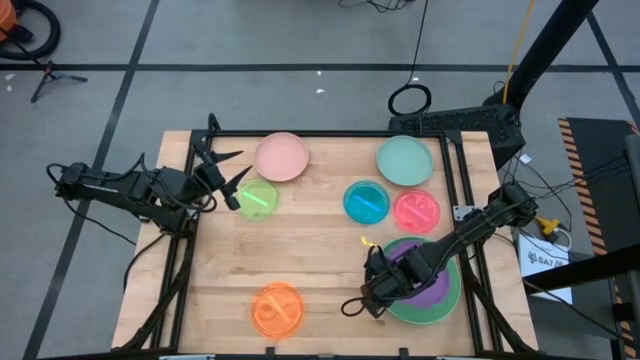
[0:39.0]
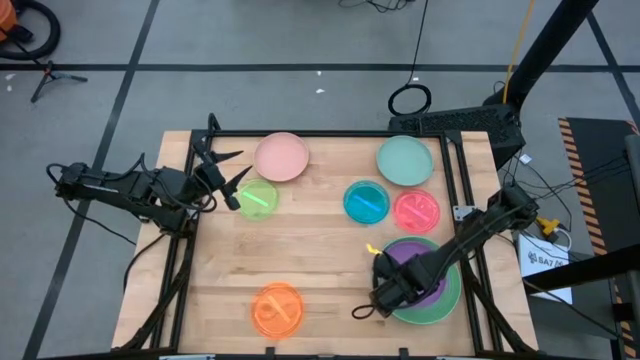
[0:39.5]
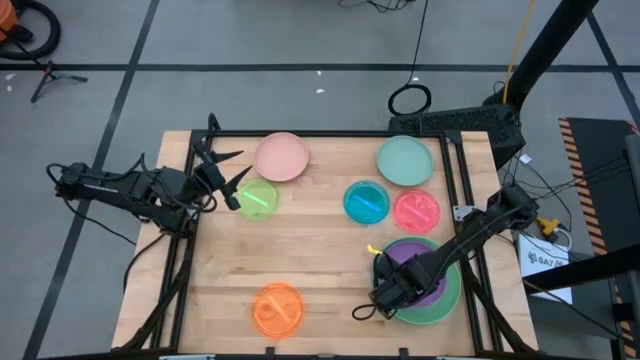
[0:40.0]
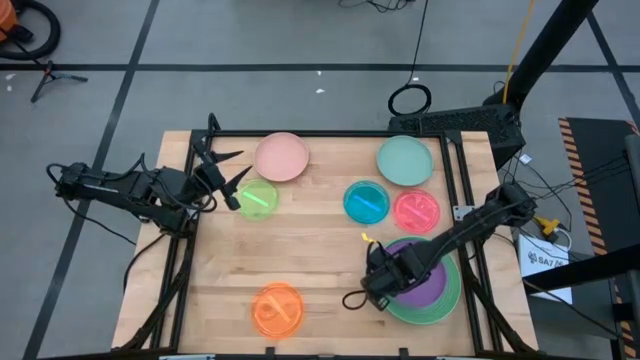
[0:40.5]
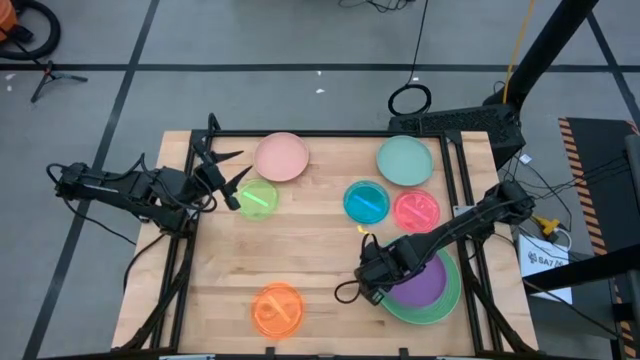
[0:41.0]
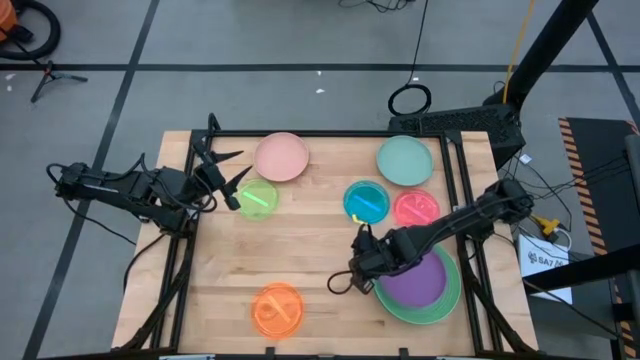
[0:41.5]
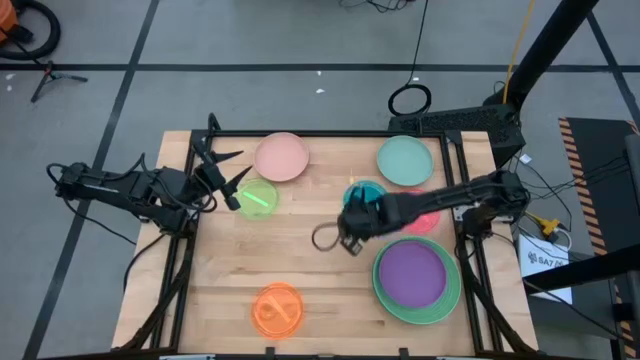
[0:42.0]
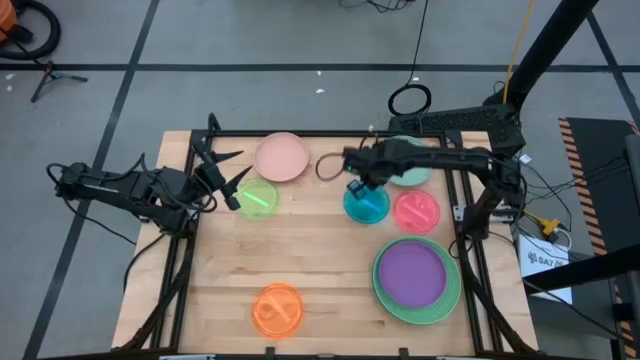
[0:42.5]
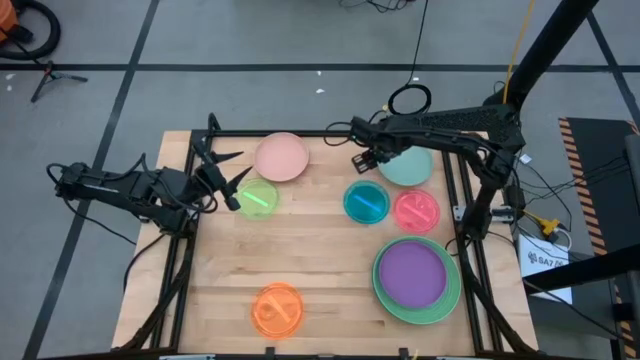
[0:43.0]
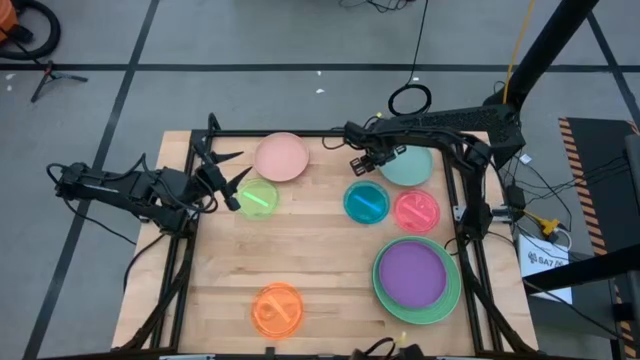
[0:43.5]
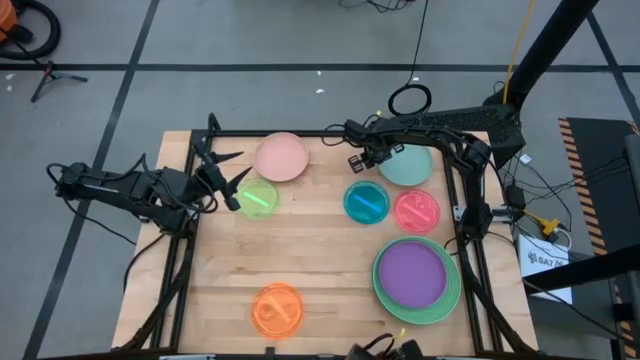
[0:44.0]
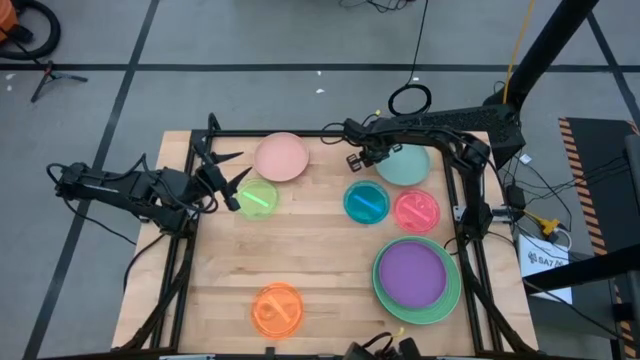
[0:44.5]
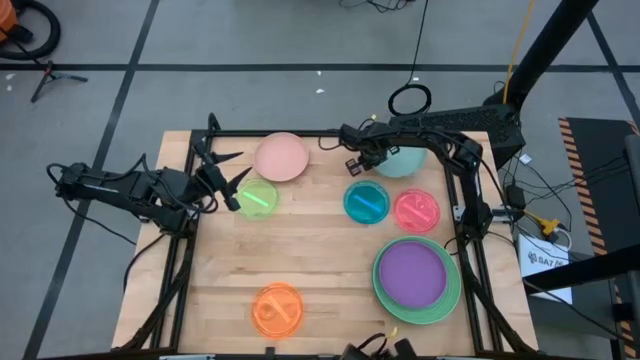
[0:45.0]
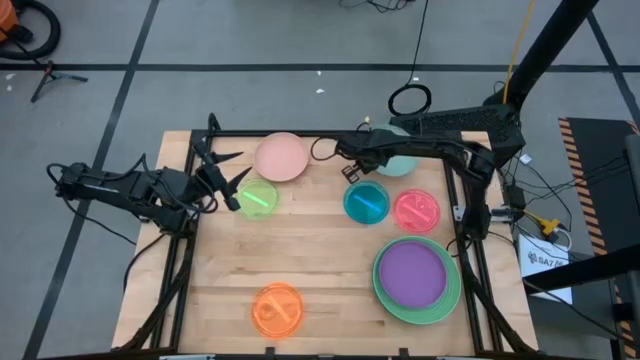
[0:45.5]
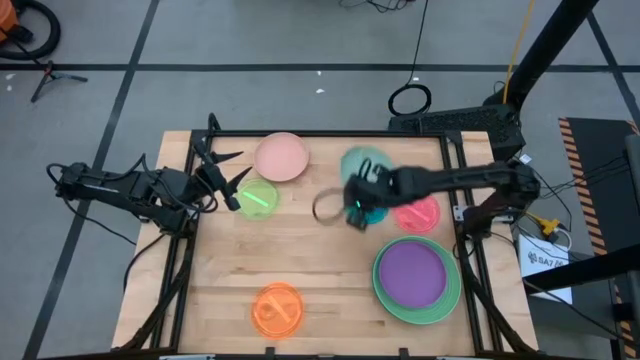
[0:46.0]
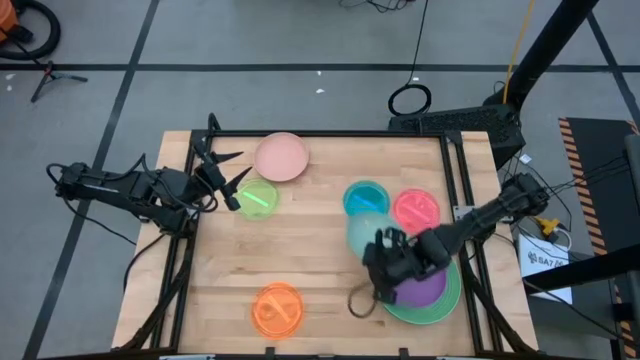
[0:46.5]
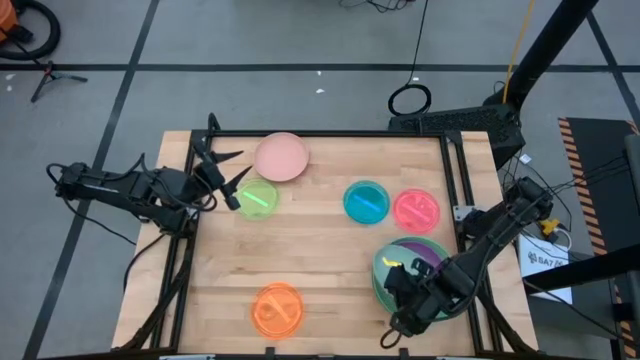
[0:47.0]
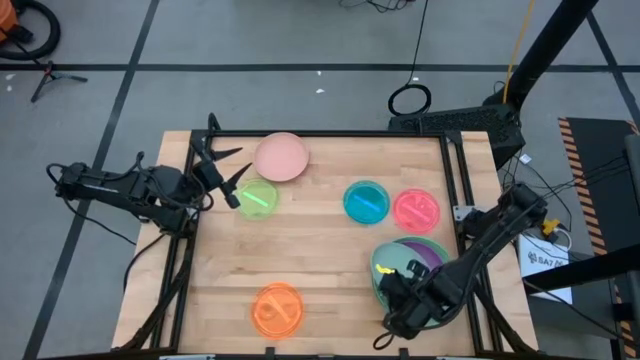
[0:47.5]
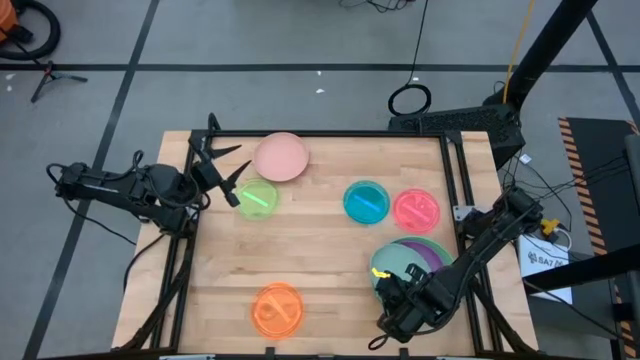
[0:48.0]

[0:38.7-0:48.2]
Task: Stack plastic plates
Stack the light blue plate on top of the purple plate

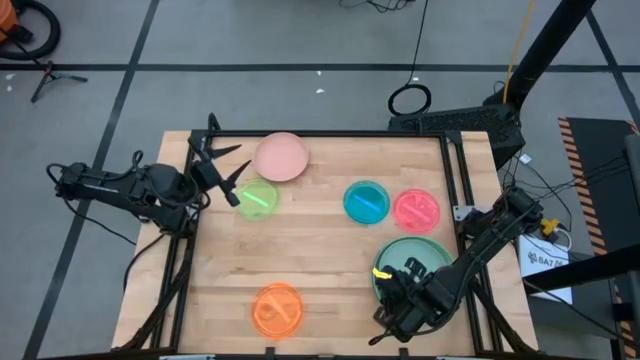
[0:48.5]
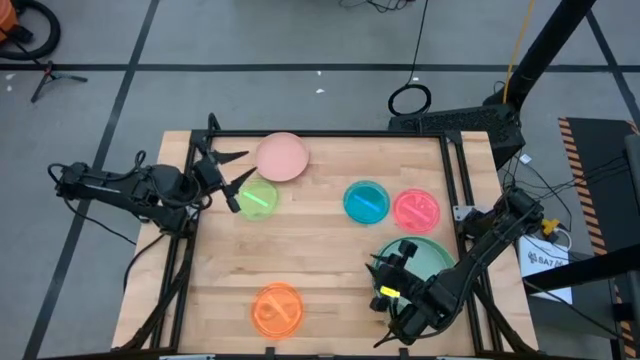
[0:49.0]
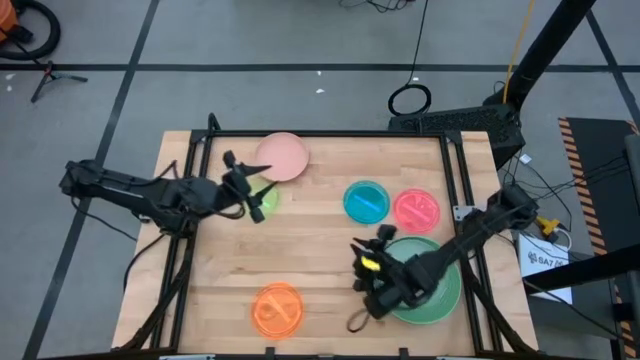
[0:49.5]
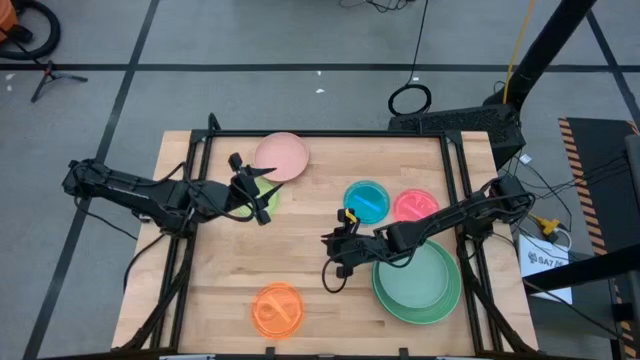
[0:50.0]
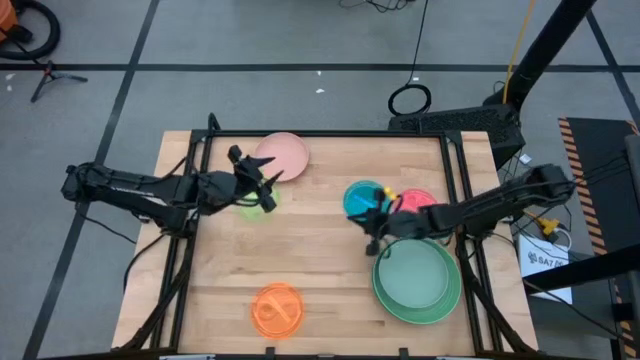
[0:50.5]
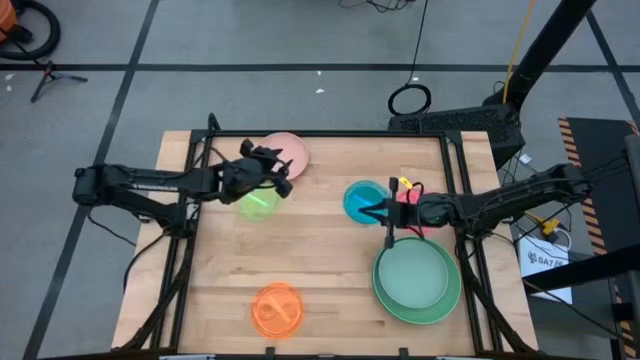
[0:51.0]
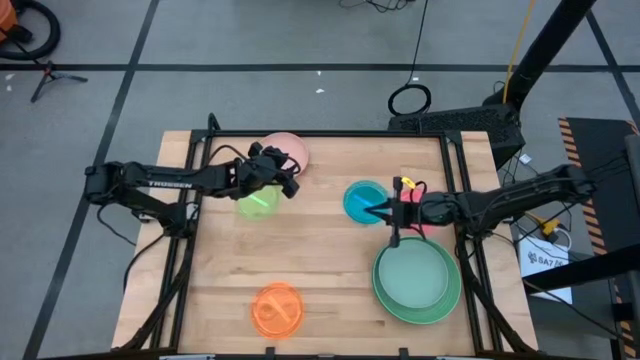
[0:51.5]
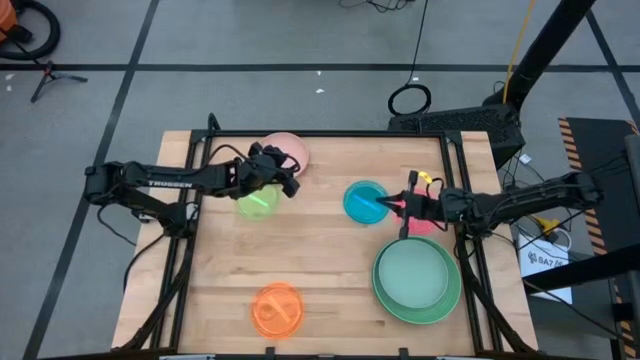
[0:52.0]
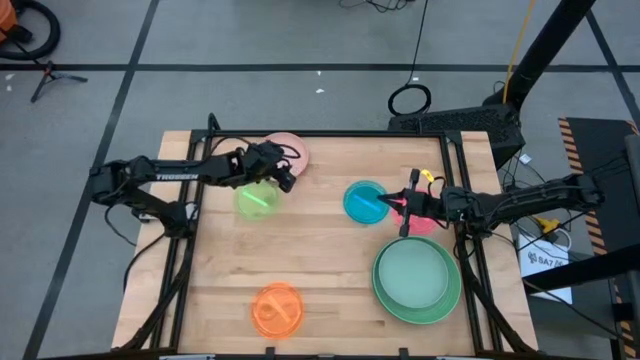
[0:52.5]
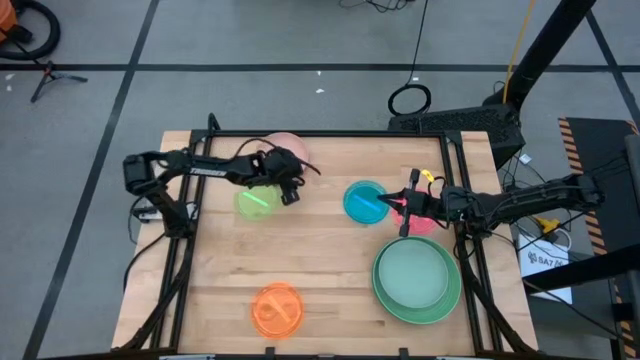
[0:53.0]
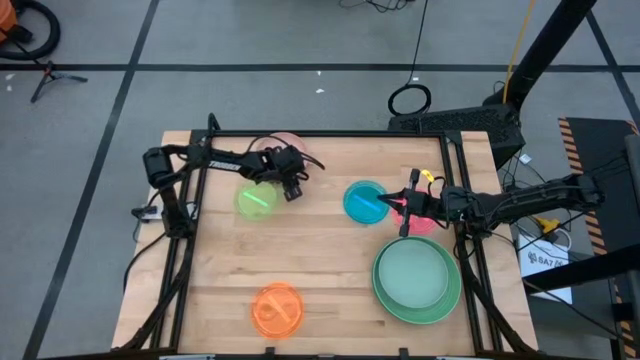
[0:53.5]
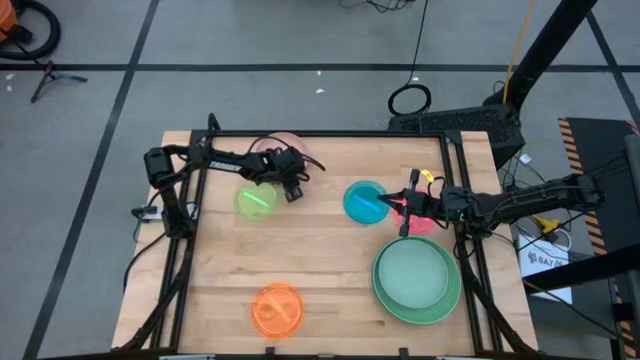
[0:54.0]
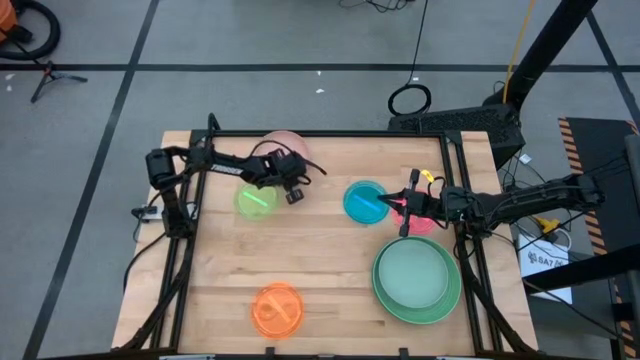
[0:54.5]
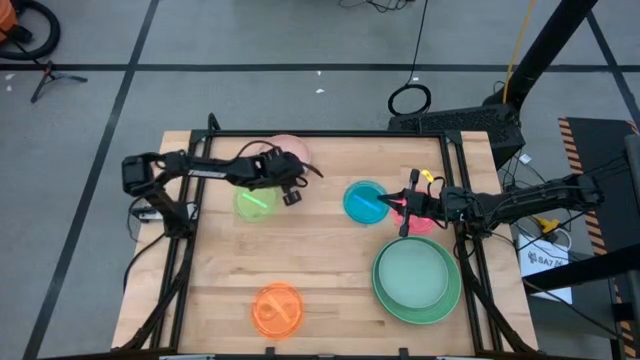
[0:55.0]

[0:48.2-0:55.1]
Stack the light pink plate on top of the light blue plate
